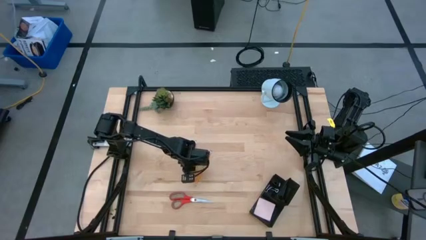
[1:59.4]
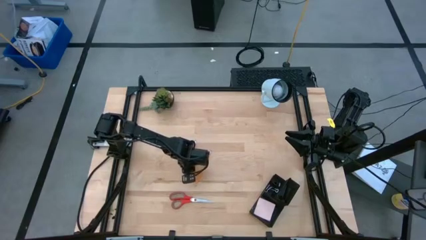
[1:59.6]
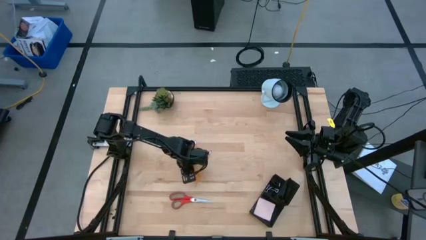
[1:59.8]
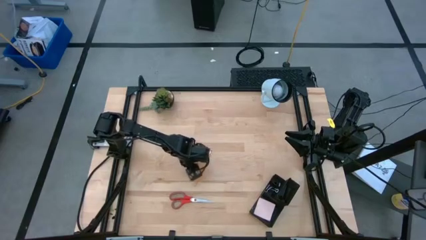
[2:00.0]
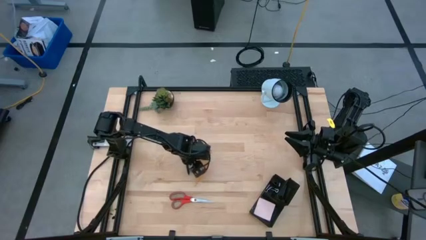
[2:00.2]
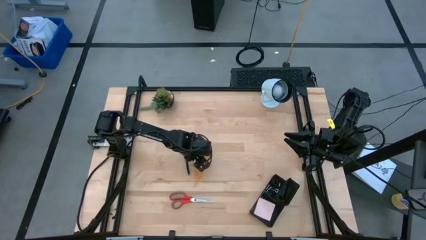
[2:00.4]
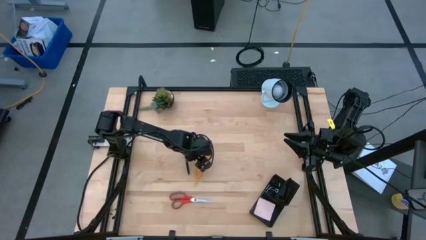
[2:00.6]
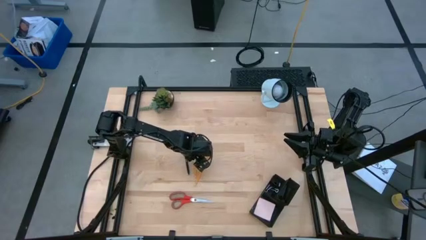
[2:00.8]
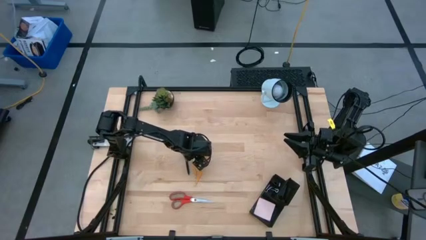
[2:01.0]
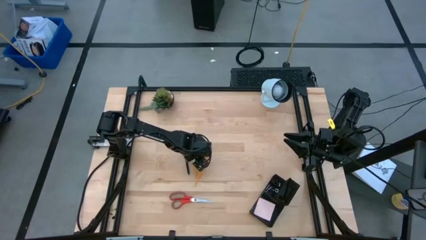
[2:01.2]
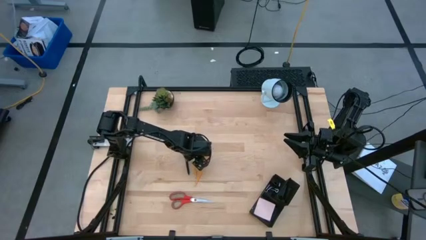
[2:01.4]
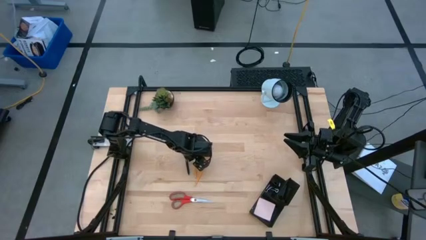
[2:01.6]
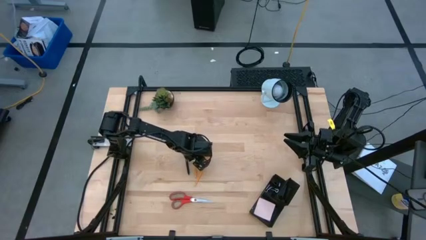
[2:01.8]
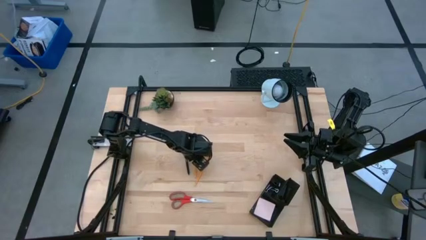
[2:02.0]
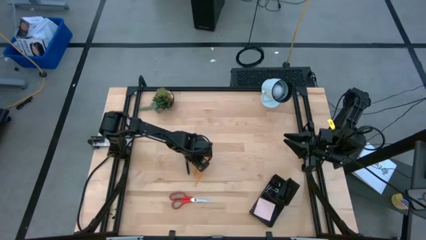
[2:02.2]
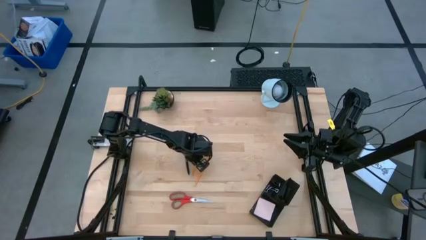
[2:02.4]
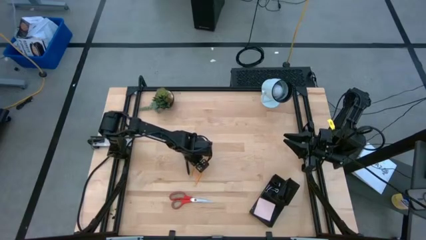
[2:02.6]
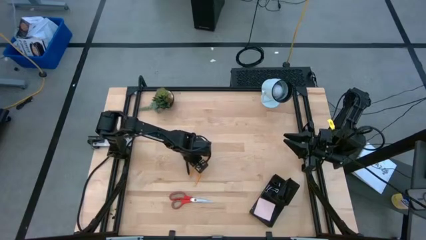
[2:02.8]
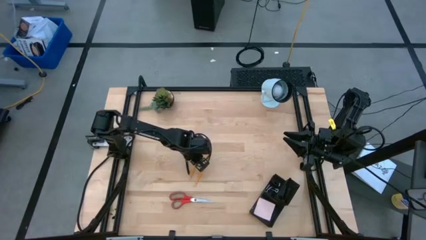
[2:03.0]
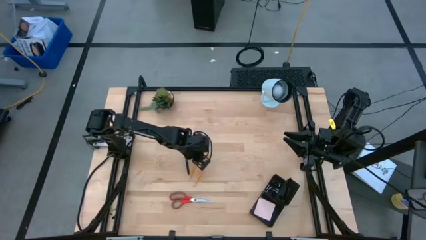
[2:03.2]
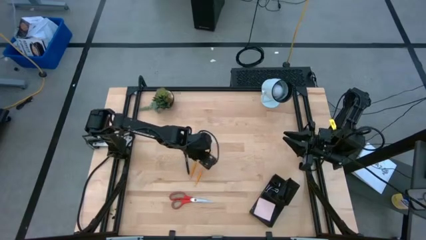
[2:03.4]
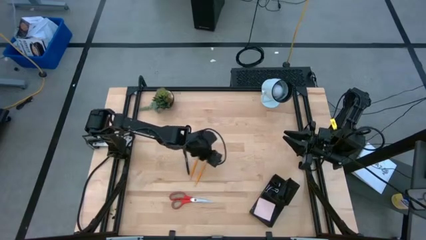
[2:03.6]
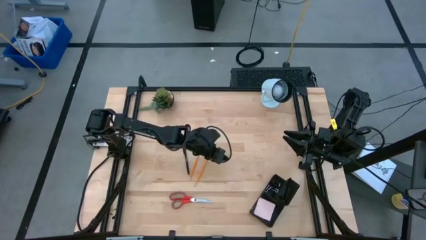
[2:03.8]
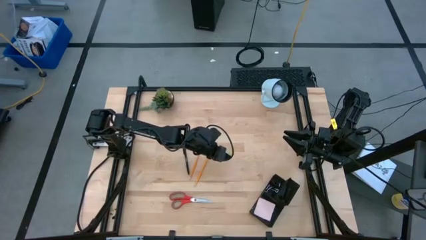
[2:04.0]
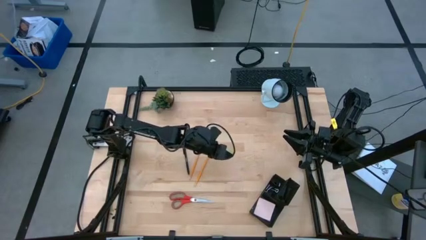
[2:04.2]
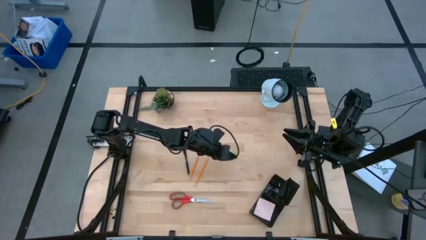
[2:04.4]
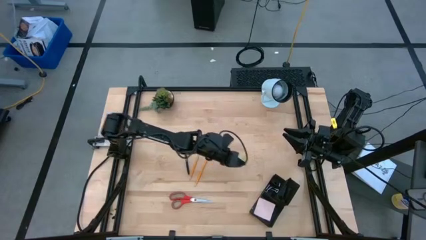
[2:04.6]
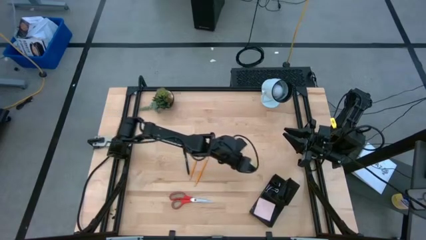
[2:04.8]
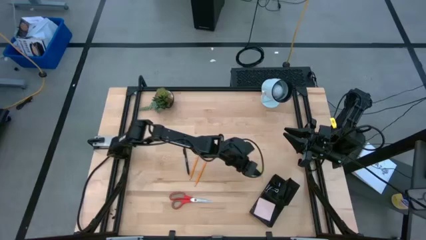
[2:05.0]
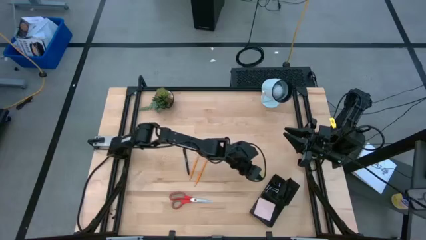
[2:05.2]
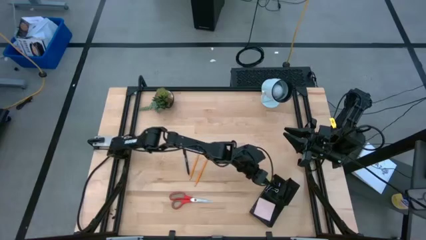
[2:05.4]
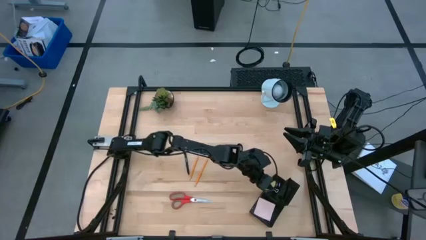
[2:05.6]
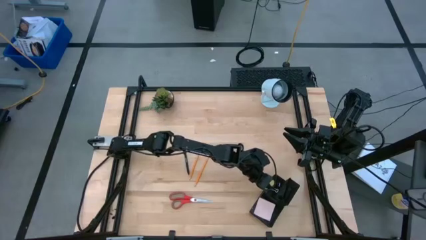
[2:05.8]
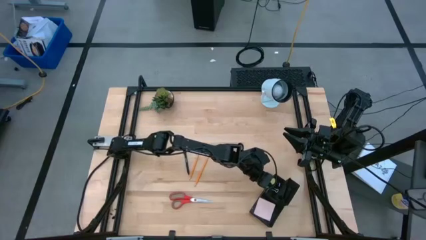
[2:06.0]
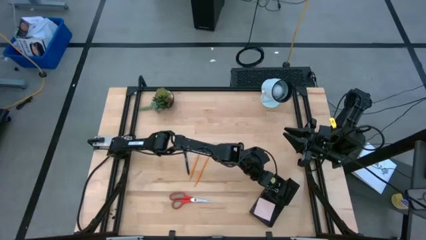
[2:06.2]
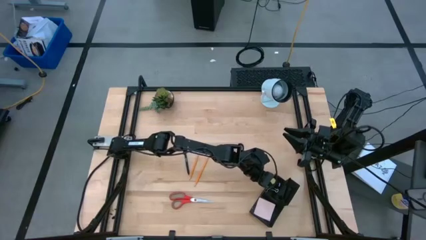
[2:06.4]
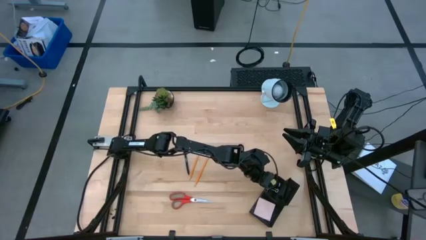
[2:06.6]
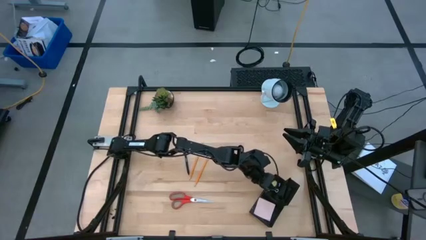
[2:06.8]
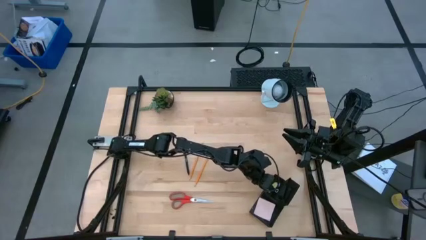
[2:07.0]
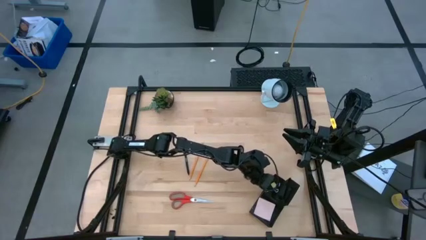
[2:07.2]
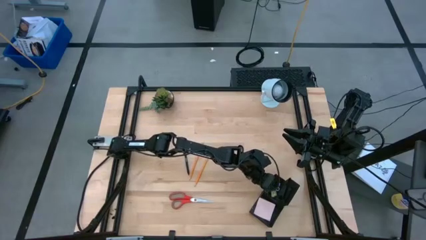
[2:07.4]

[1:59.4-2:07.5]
Task: Pick and place office supplies into organizer
Put the green eraser into the desk organizer

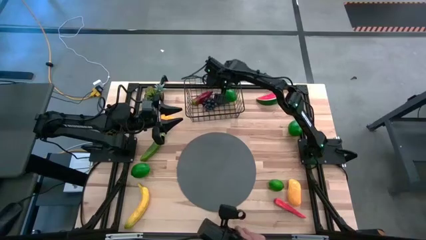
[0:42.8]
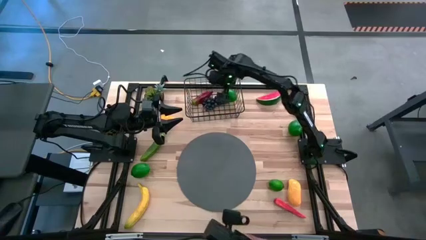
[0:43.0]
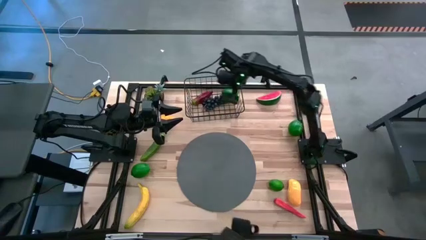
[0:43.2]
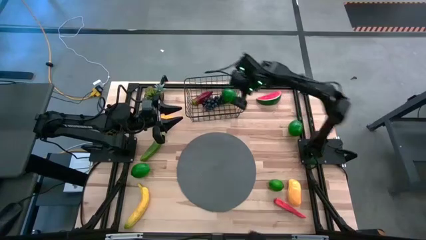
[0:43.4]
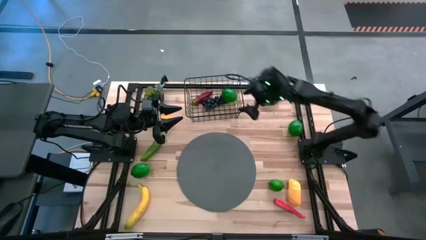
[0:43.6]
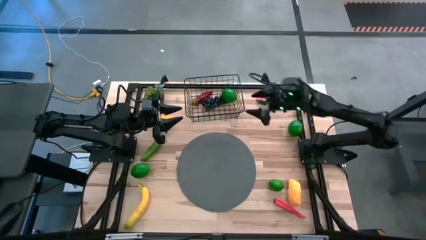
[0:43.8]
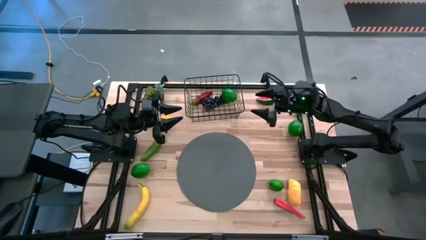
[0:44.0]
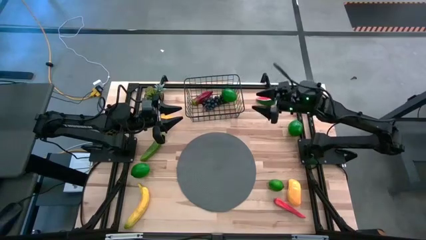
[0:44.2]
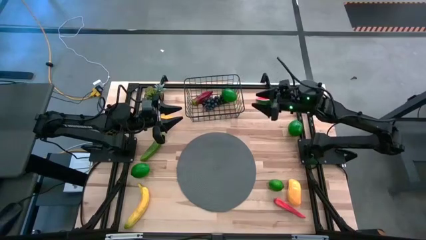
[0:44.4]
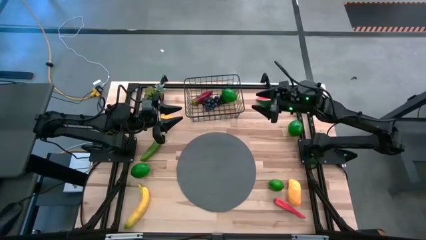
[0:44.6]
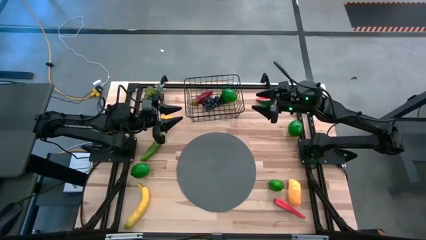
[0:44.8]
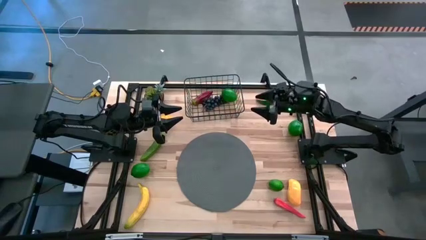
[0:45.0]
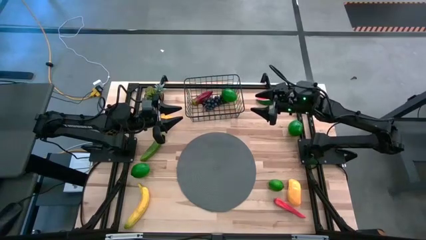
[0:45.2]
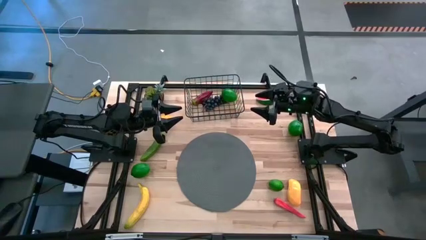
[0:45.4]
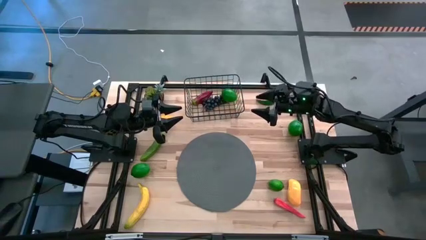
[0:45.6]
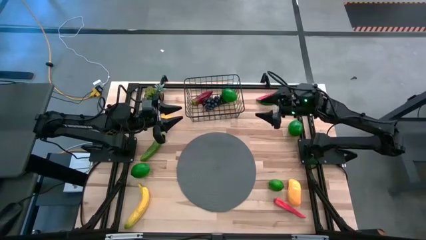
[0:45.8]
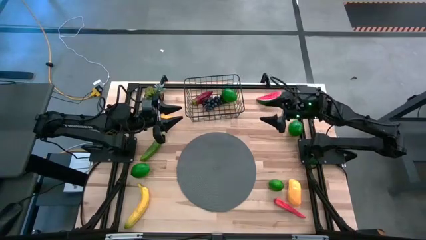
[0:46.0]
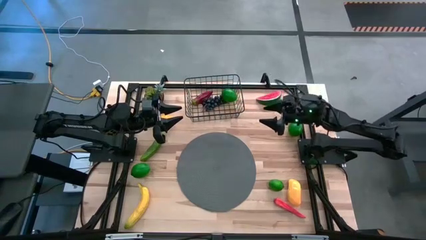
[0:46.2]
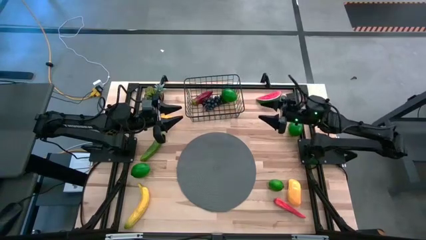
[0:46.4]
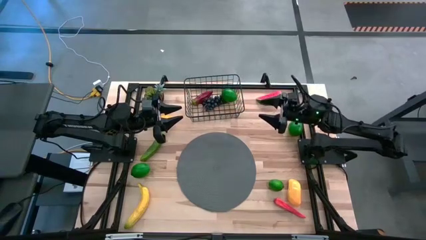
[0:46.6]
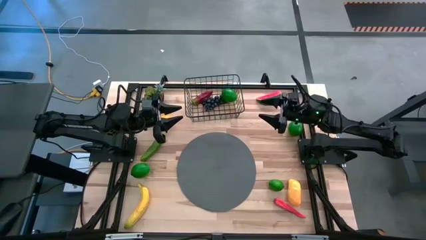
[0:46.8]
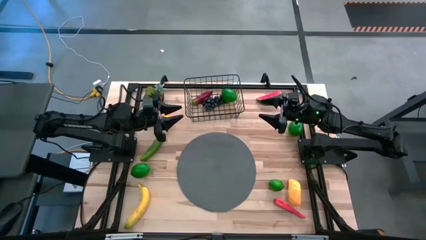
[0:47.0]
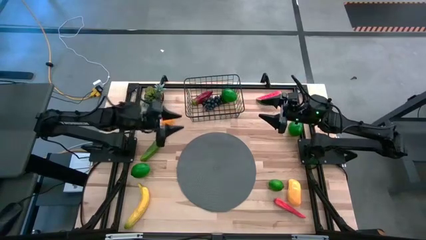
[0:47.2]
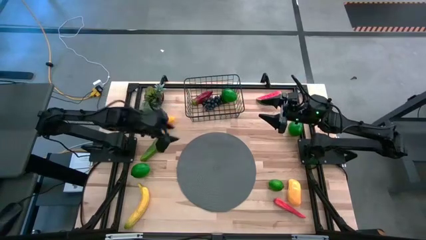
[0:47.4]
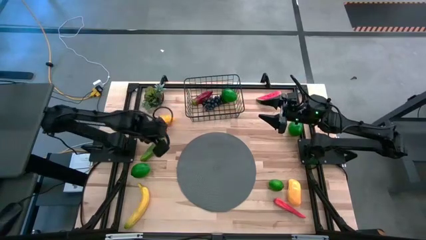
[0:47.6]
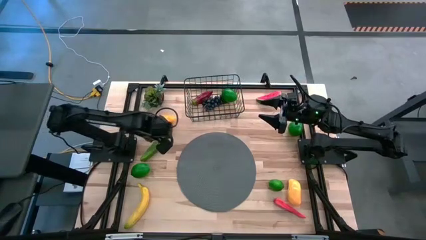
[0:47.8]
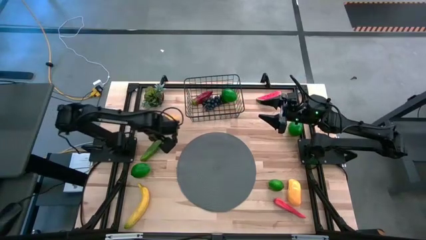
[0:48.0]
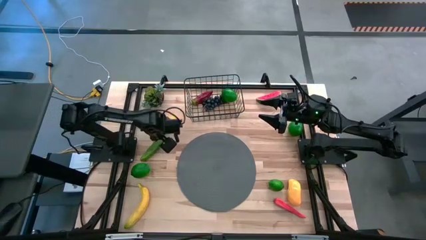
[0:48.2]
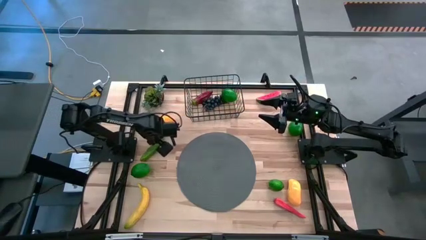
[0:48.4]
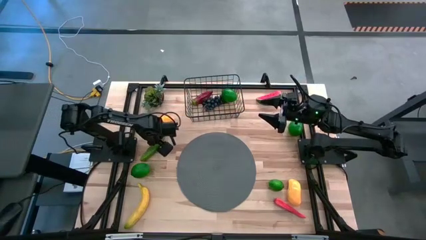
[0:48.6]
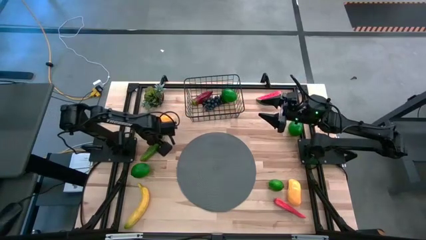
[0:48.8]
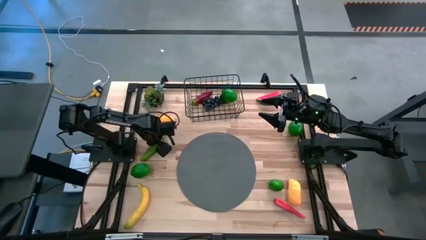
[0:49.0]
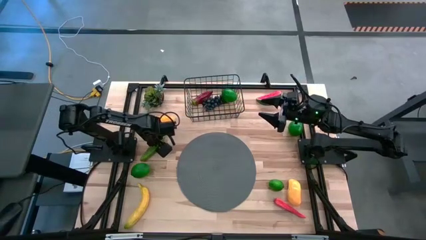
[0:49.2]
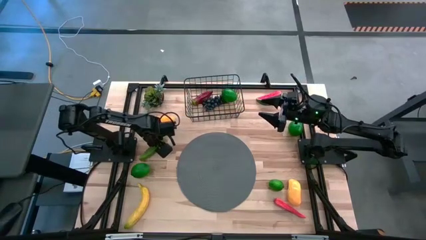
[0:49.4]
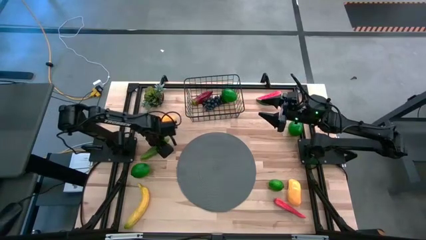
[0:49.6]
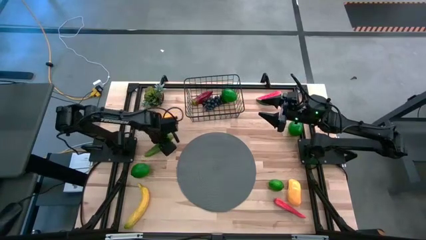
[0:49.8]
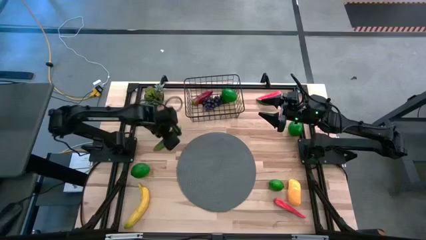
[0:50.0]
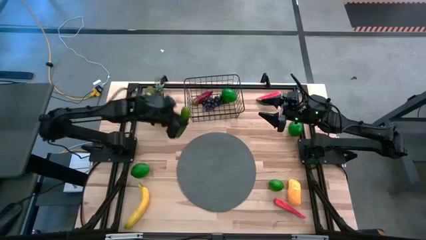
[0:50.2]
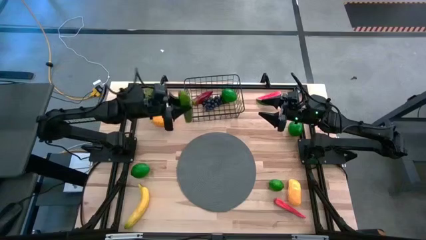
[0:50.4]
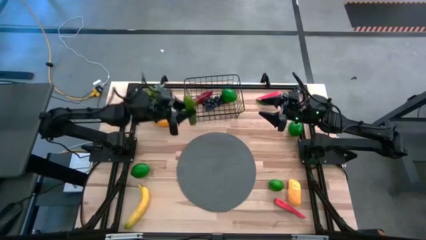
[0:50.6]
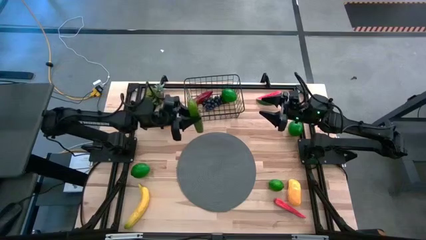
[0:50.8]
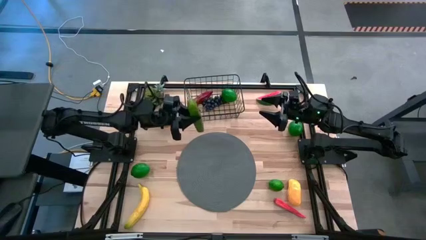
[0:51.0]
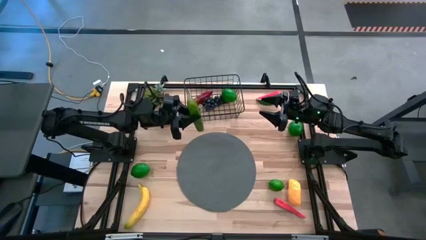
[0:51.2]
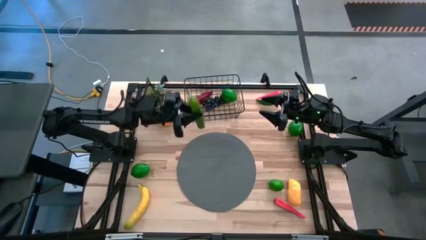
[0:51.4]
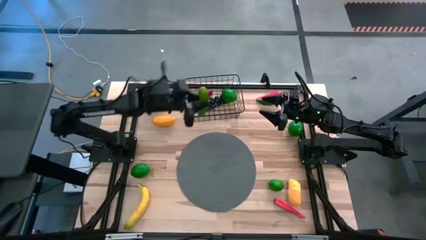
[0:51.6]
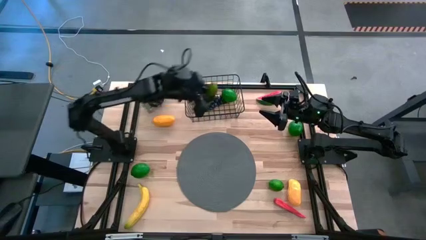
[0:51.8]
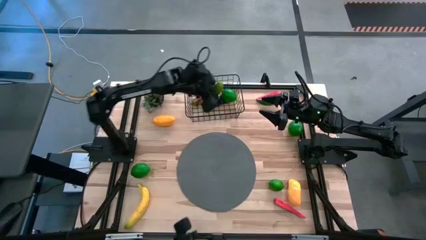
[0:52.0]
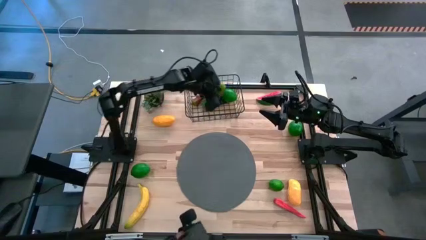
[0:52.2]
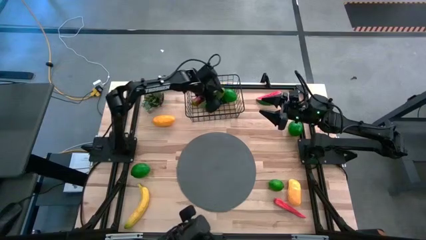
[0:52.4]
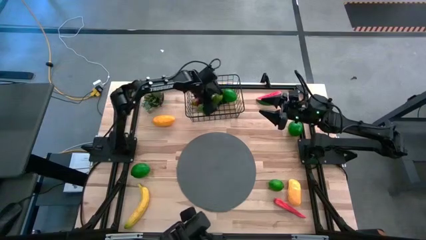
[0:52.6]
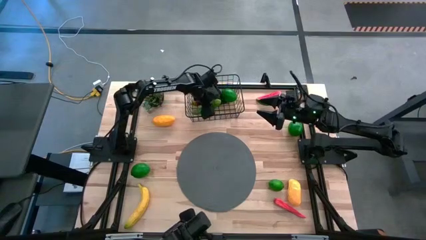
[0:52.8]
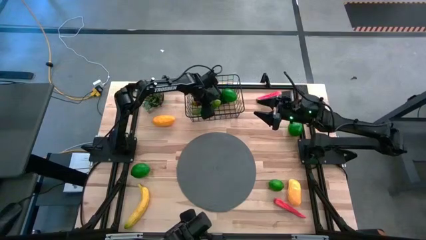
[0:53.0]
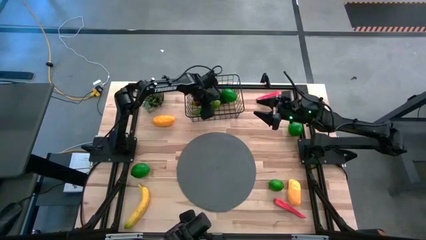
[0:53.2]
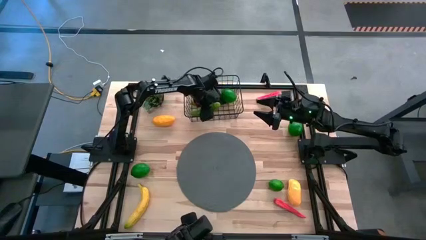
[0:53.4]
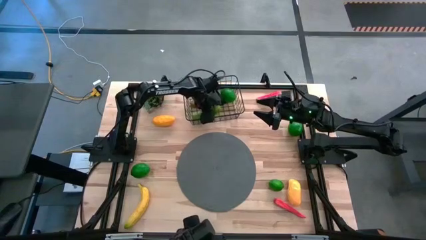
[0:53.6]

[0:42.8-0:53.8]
Task: Build produce basket
Put the green cucumber into the black wire basket
